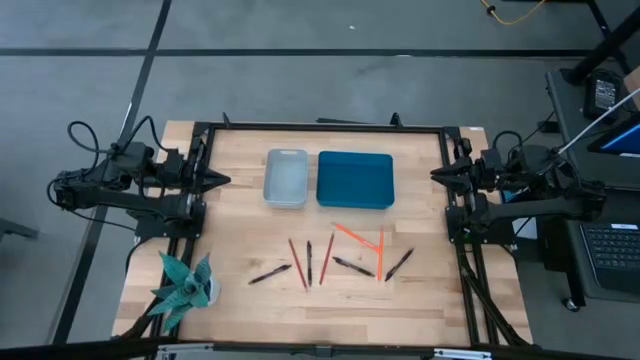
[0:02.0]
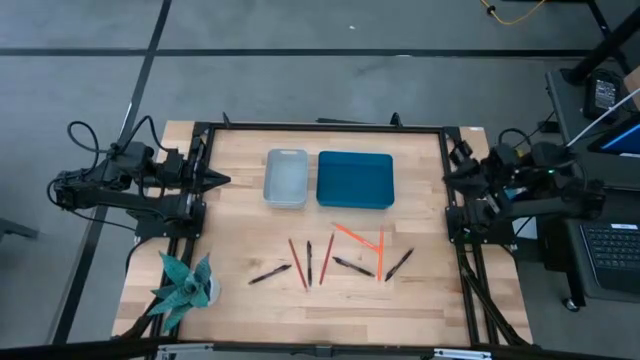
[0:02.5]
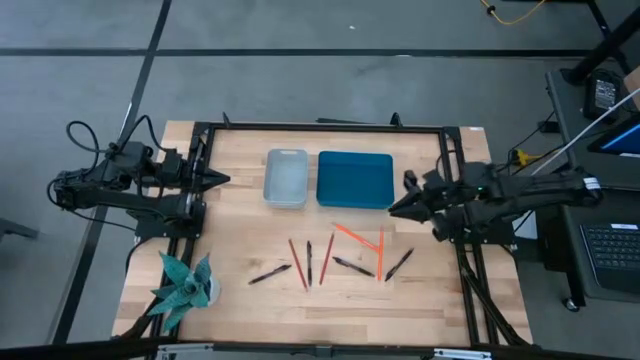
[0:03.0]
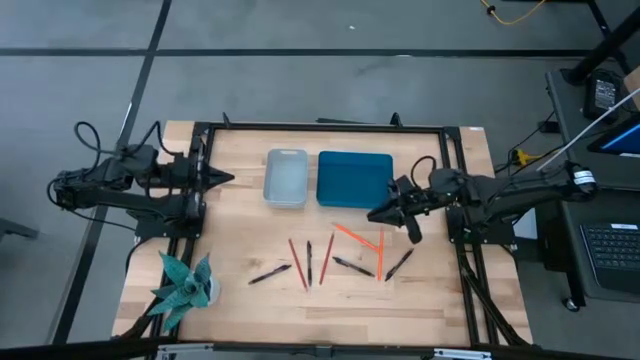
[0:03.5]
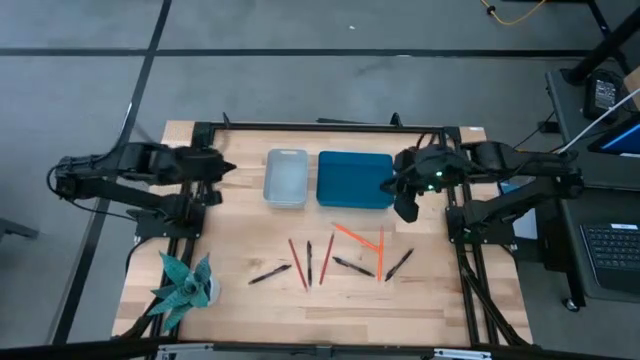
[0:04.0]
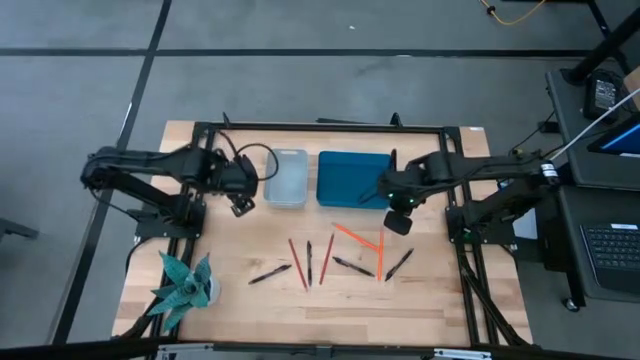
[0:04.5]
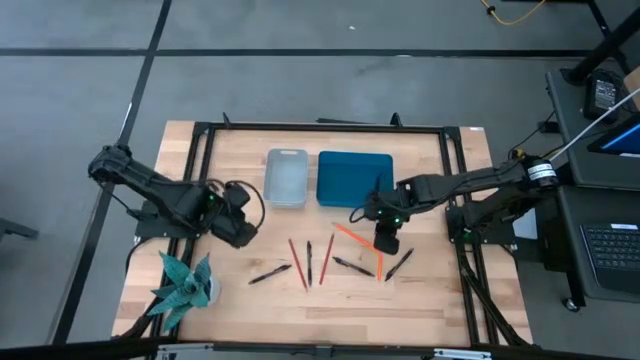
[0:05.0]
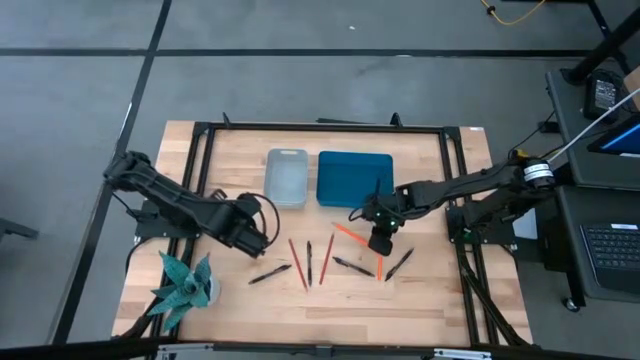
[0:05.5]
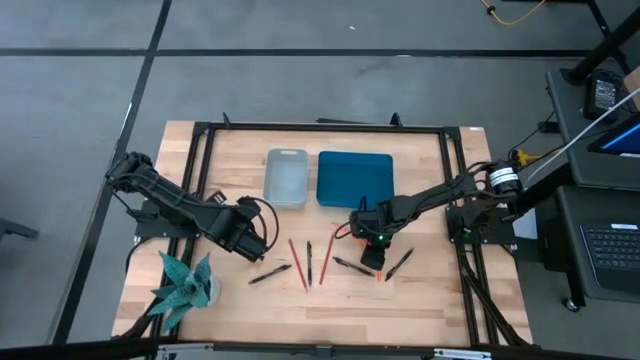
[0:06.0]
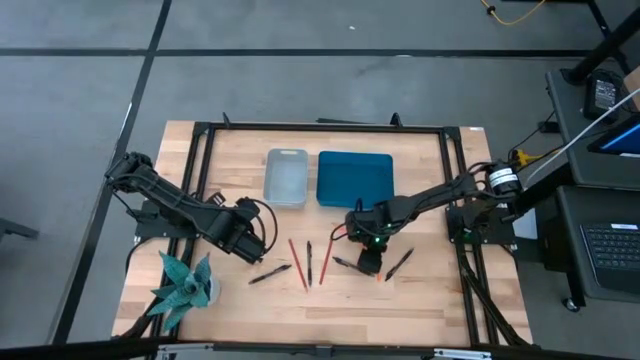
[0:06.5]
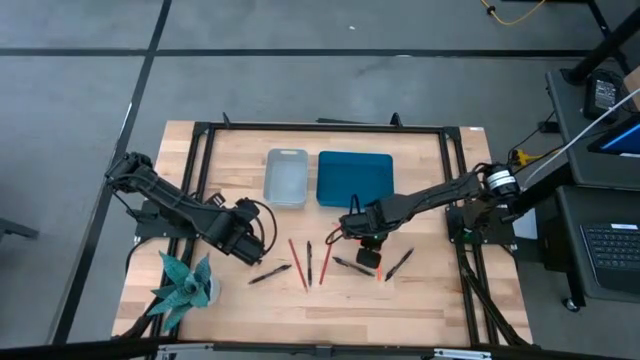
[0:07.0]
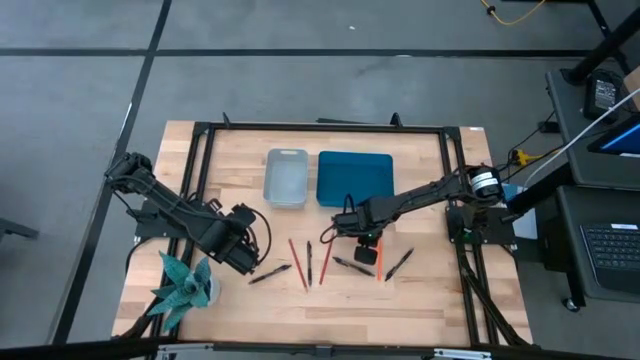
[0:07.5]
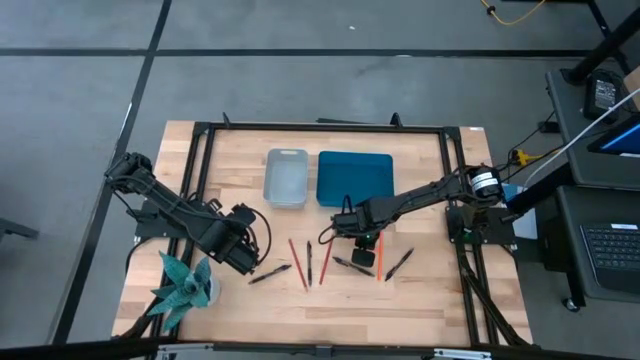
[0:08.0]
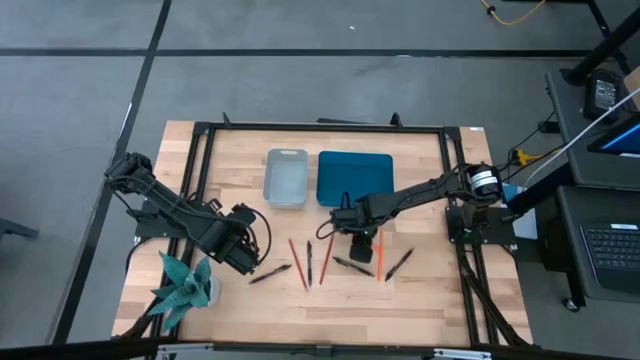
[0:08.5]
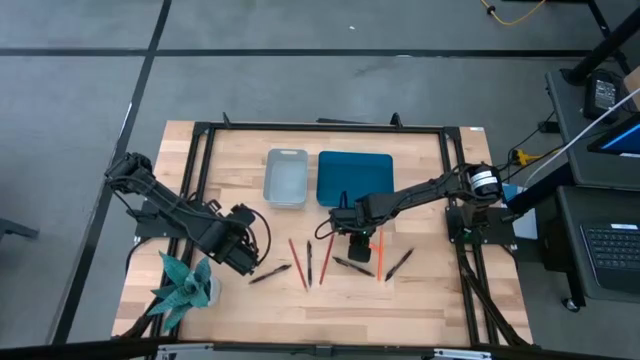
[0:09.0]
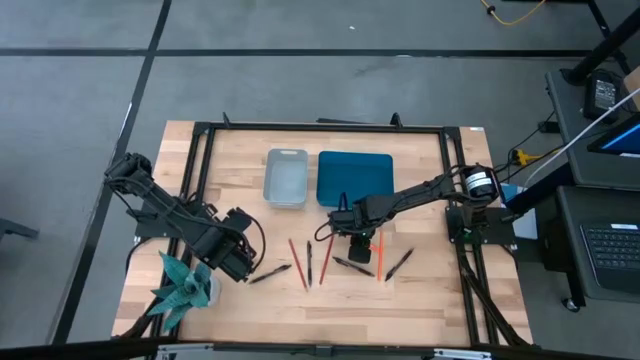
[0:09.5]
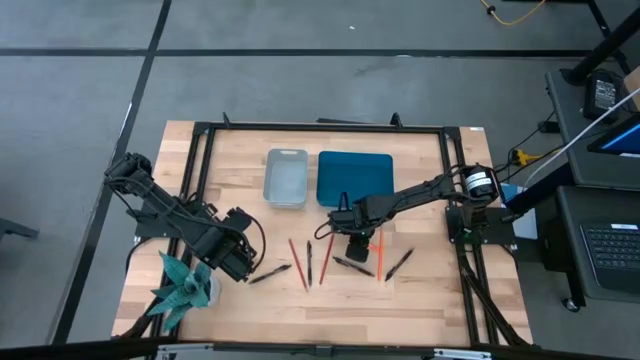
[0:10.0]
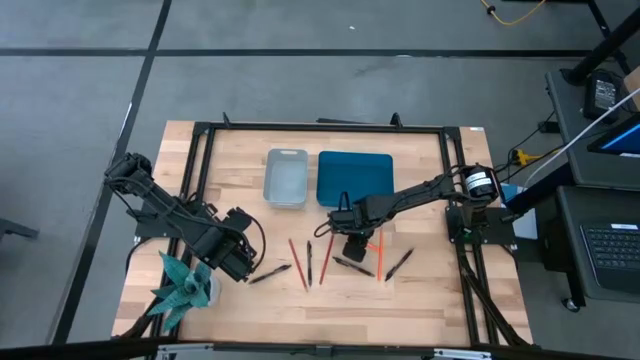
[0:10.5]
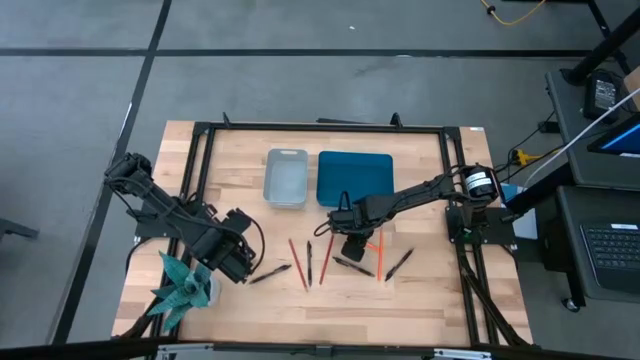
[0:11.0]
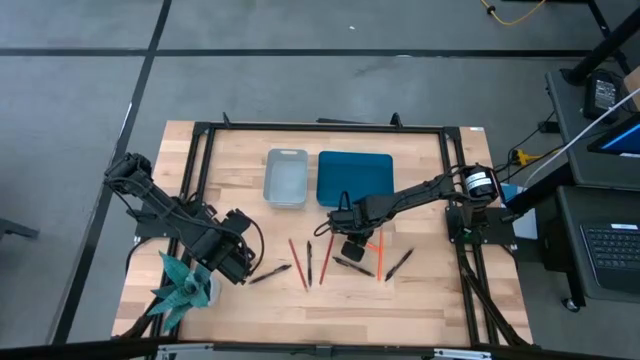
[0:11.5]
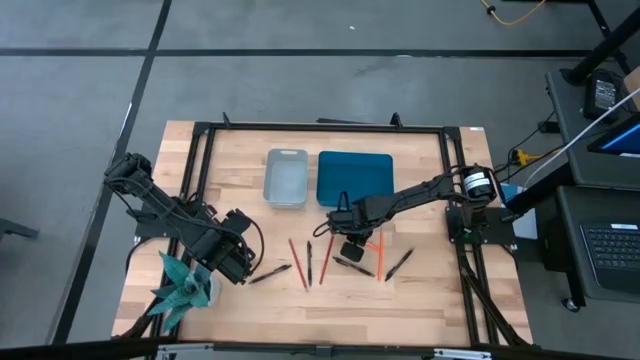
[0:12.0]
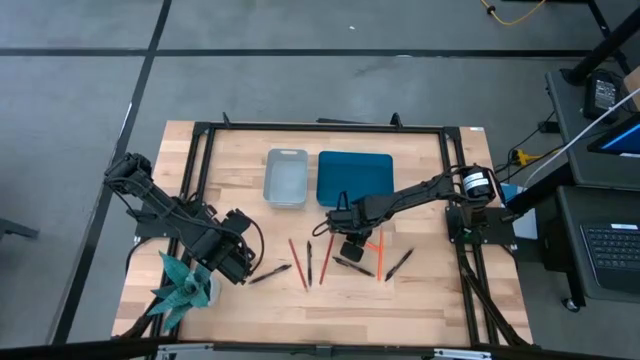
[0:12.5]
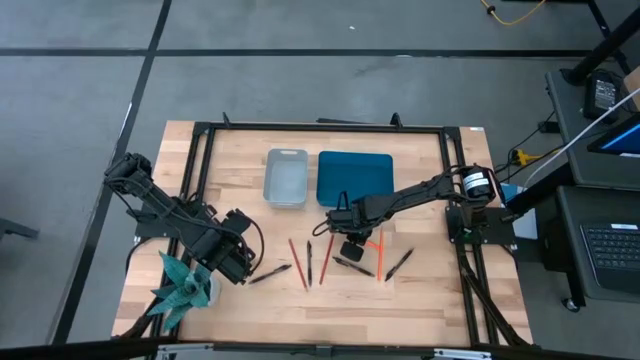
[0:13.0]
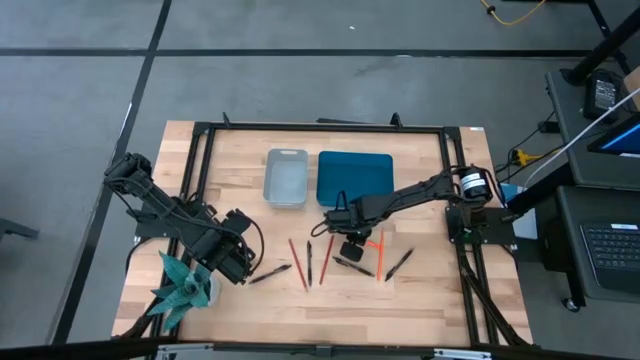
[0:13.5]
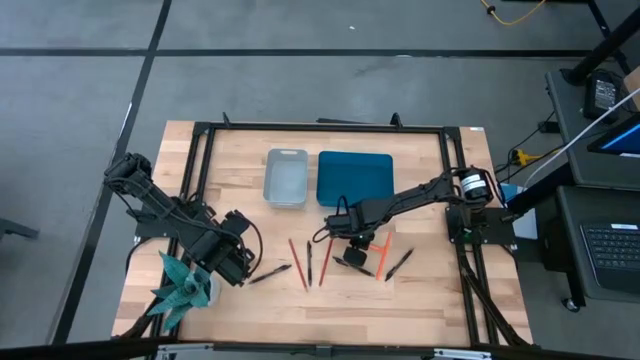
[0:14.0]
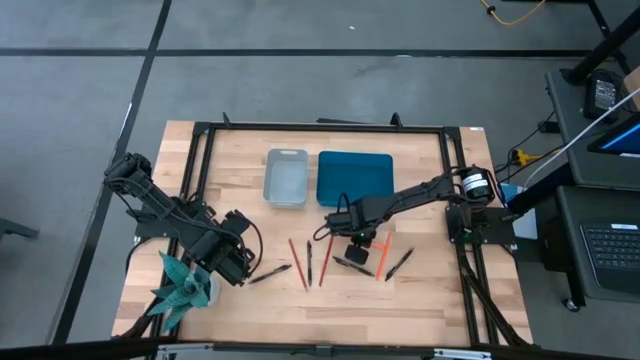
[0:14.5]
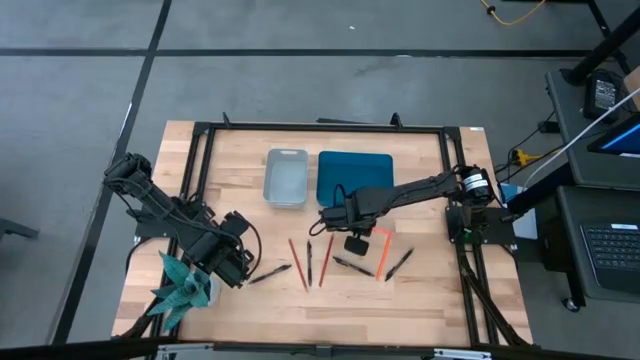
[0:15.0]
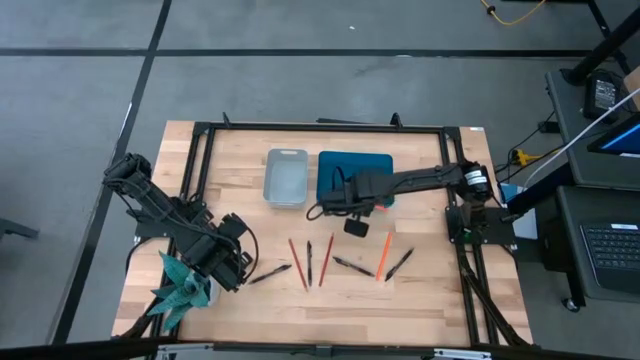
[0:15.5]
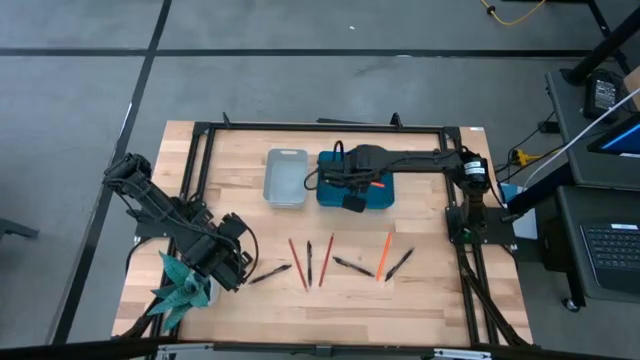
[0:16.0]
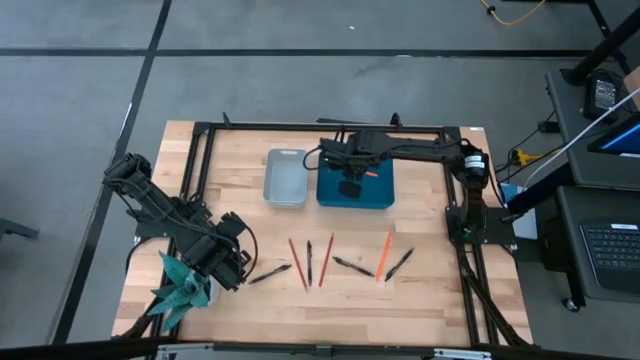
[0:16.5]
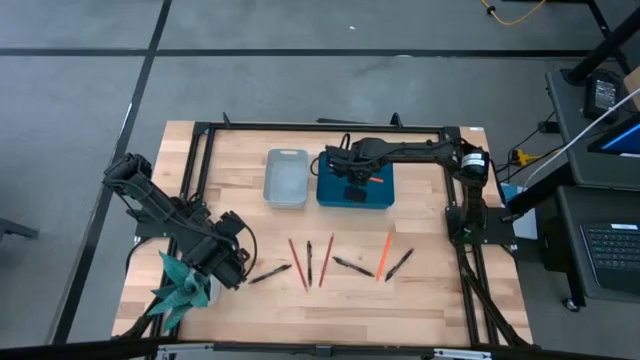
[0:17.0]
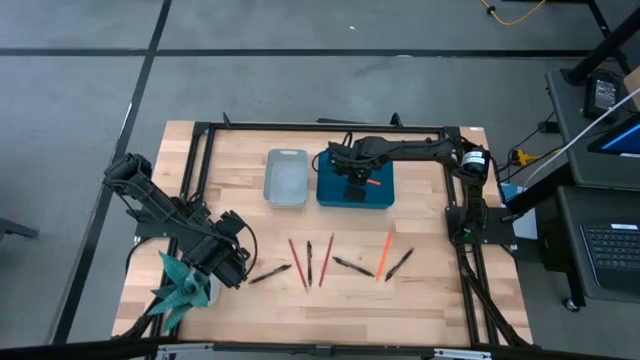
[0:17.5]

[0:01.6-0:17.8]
Task: Sort pens & pencils
Put the left orange pencil into the blue bin

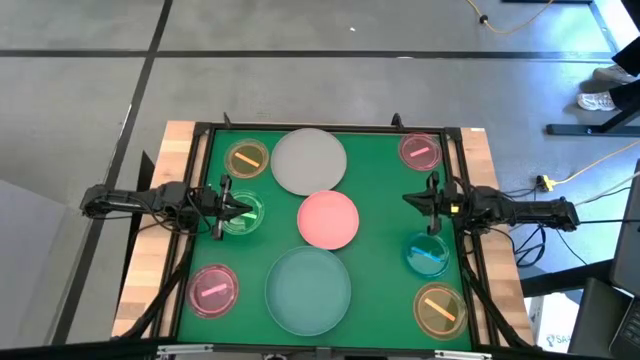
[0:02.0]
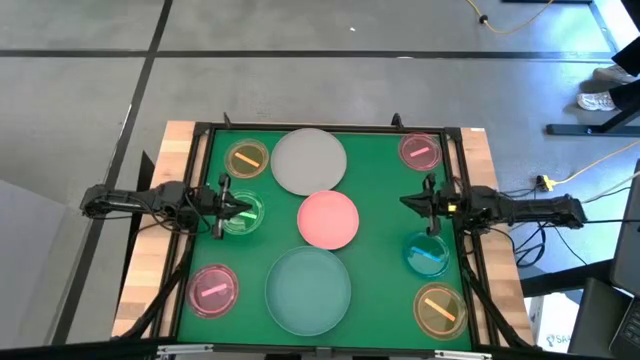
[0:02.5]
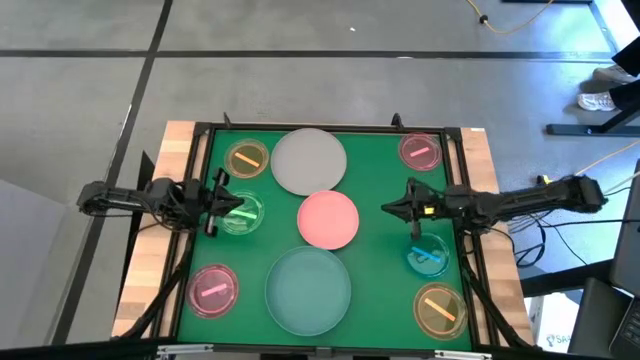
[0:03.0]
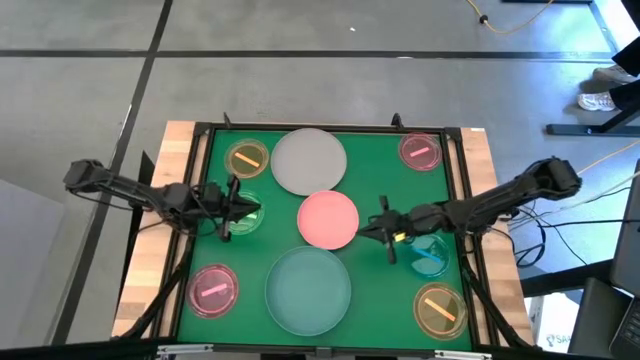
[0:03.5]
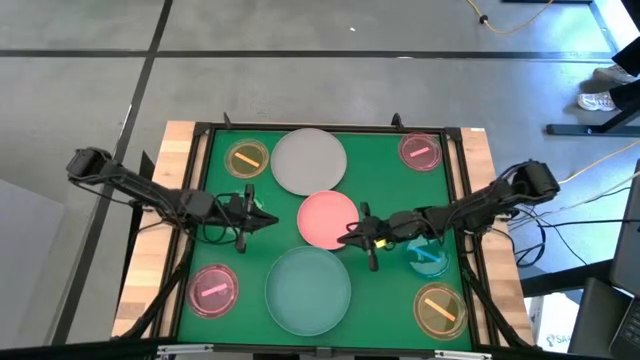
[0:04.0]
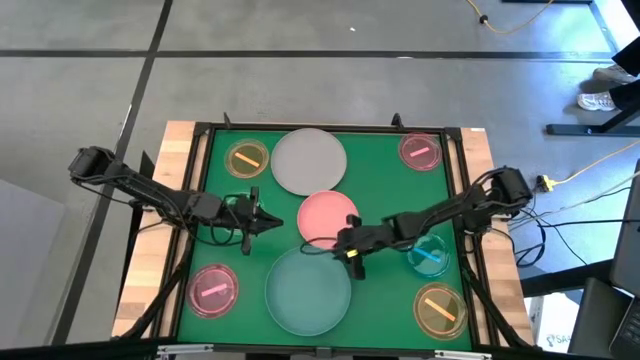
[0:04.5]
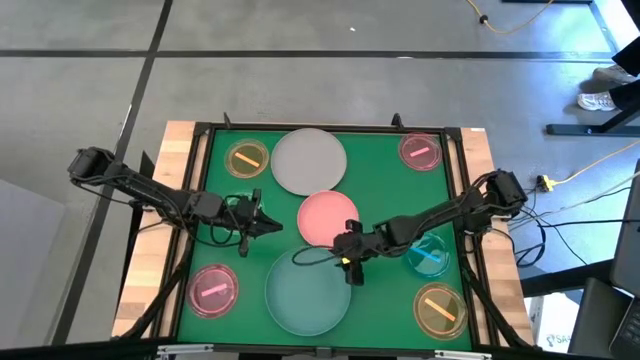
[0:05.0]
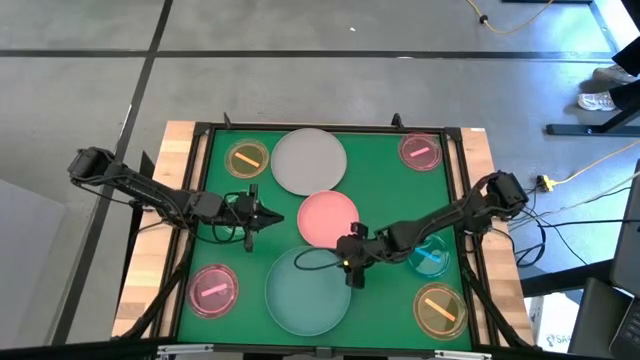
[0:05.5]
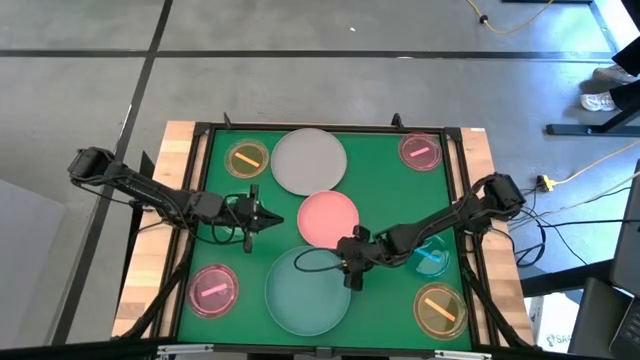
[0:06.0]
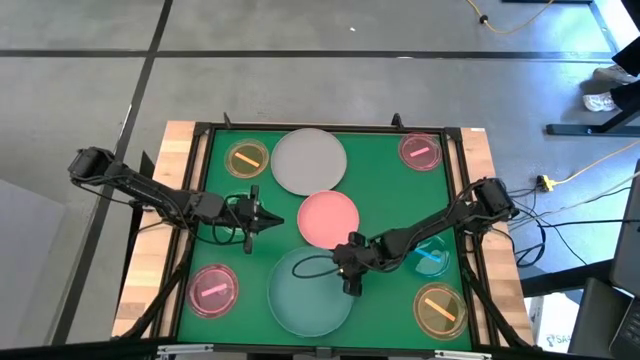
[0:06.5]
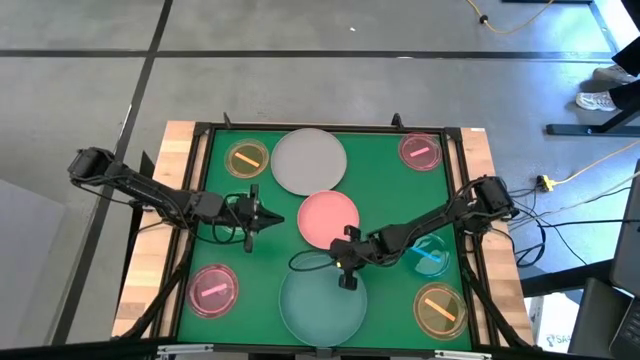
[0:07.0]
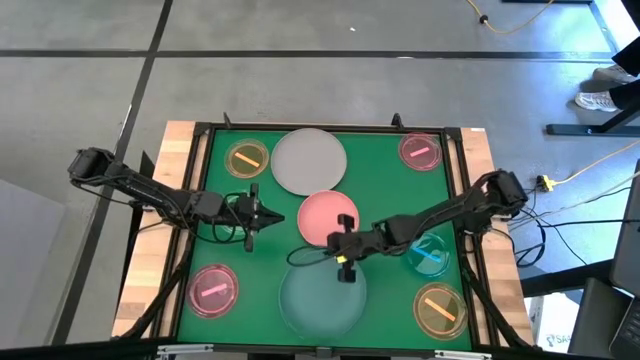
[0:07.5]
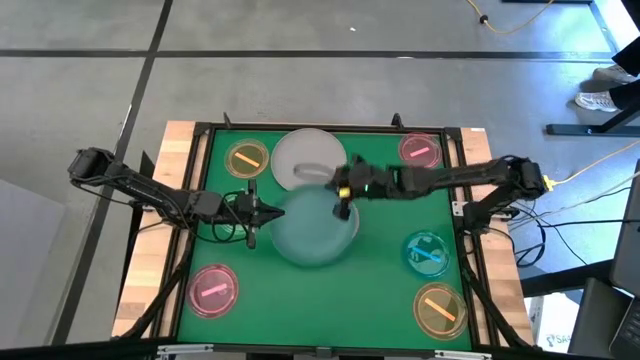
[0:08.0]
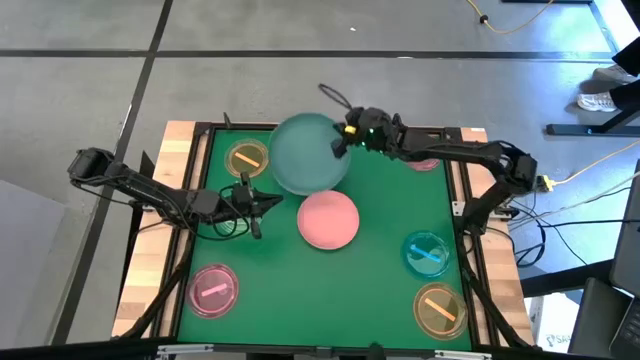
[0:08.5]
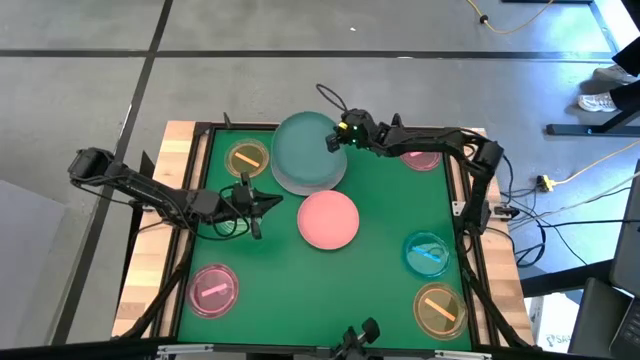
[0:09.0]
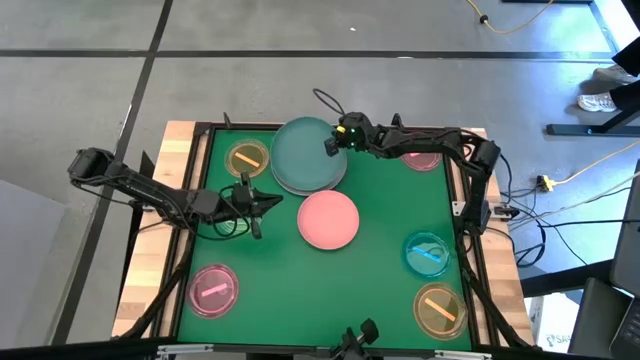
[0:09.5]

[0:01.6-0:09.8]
Task: Stack plastic plates
Stack the green plate on top of the gray plate
